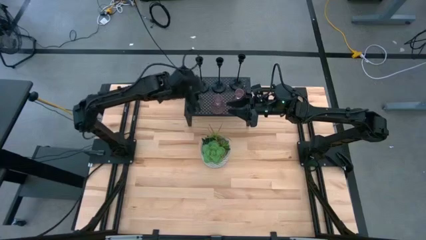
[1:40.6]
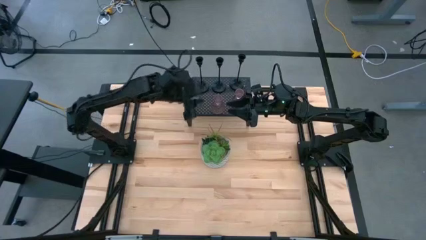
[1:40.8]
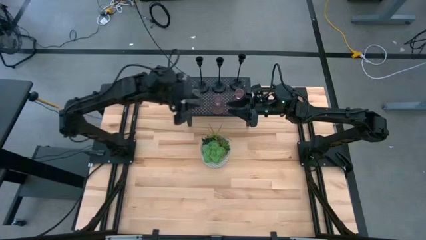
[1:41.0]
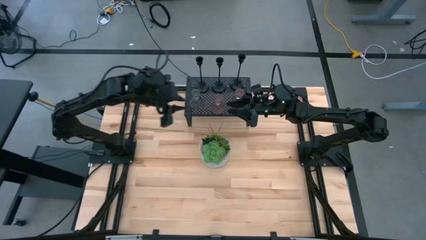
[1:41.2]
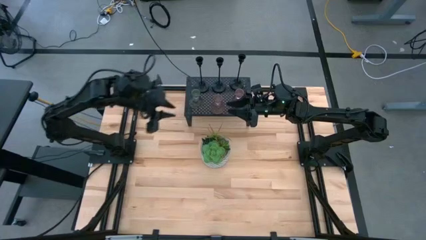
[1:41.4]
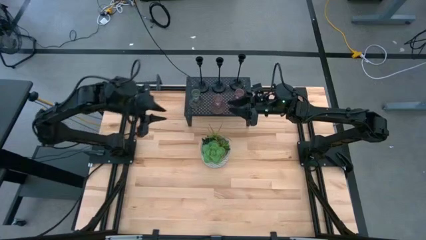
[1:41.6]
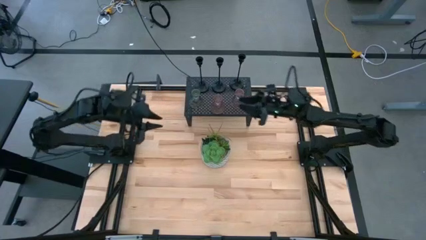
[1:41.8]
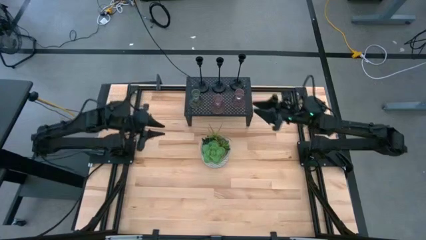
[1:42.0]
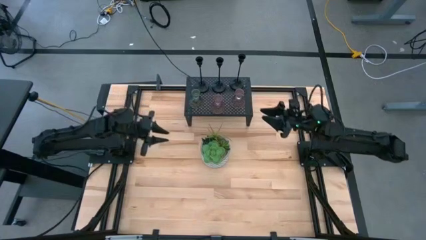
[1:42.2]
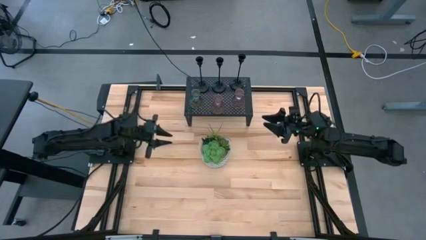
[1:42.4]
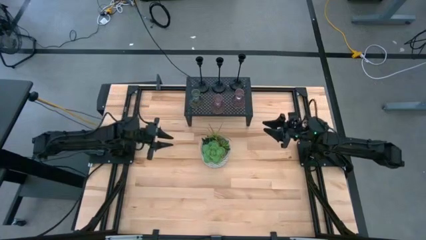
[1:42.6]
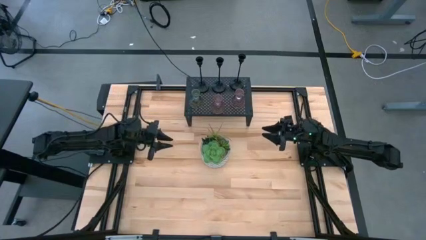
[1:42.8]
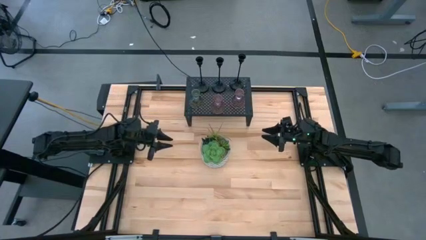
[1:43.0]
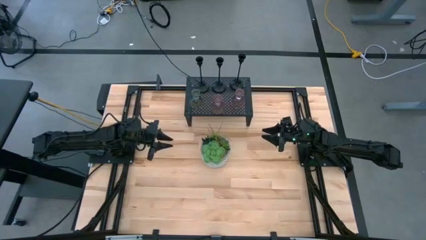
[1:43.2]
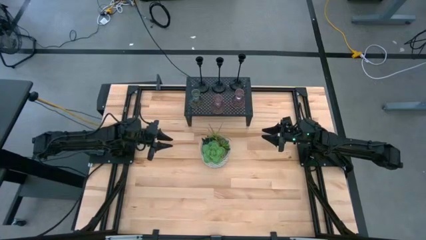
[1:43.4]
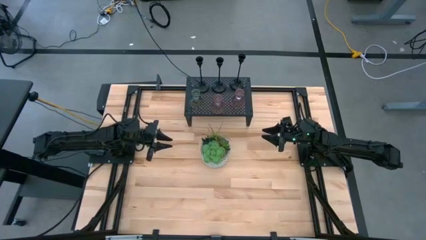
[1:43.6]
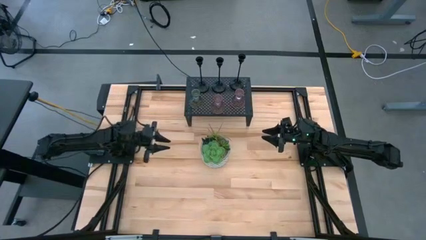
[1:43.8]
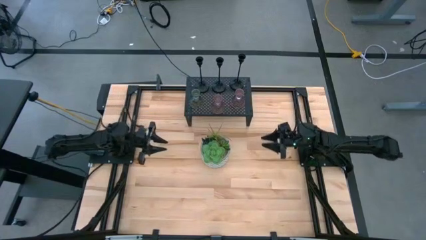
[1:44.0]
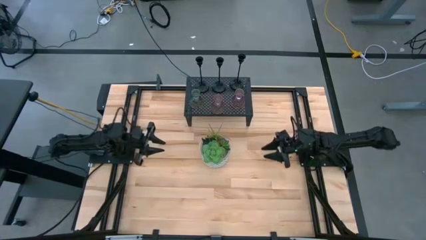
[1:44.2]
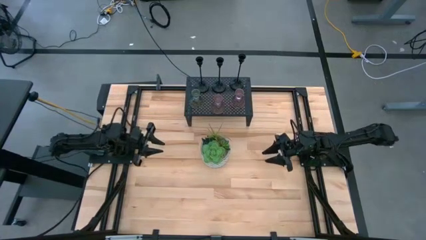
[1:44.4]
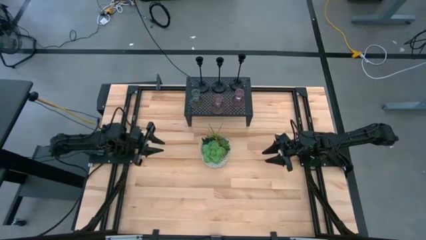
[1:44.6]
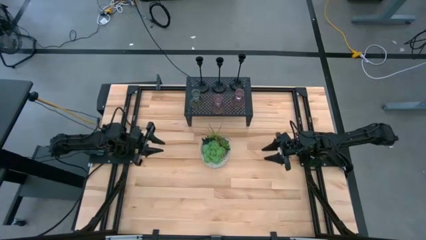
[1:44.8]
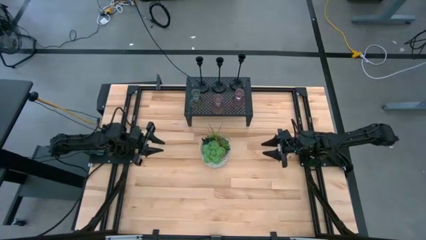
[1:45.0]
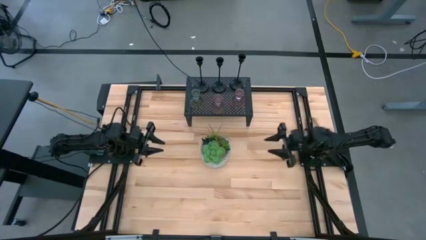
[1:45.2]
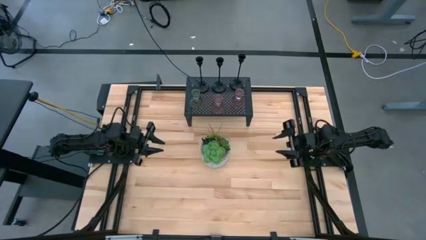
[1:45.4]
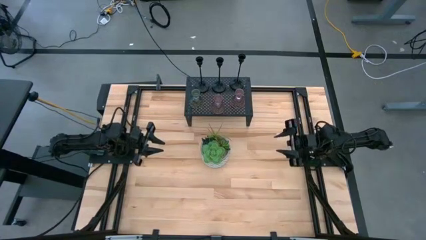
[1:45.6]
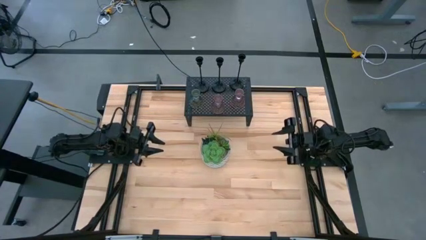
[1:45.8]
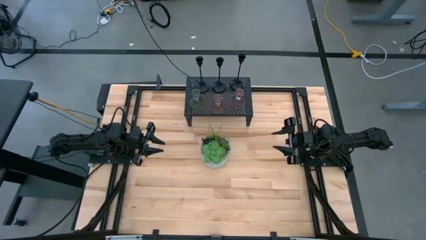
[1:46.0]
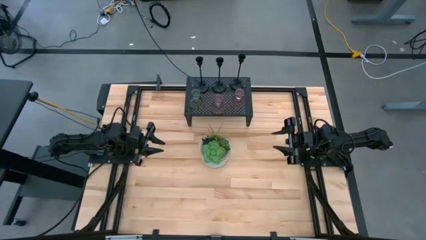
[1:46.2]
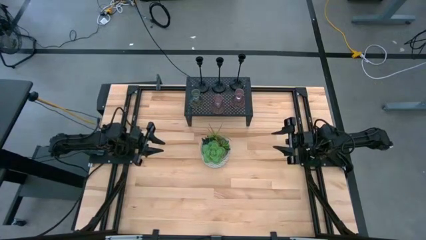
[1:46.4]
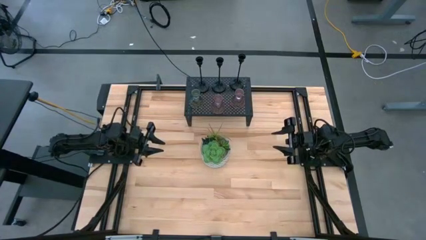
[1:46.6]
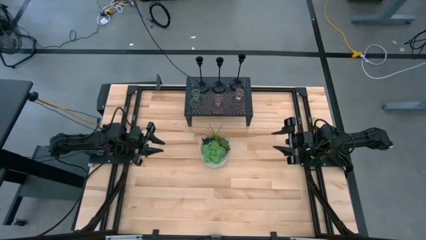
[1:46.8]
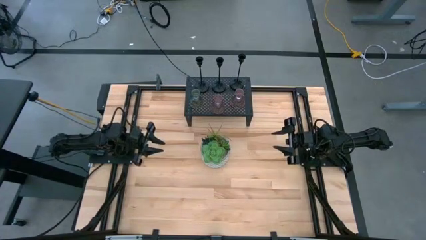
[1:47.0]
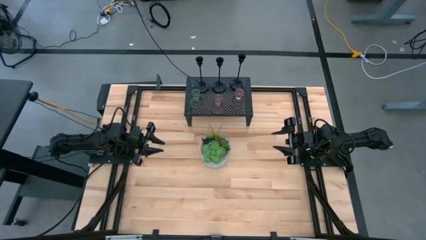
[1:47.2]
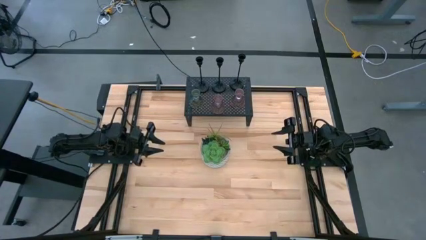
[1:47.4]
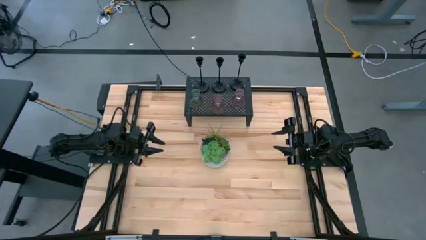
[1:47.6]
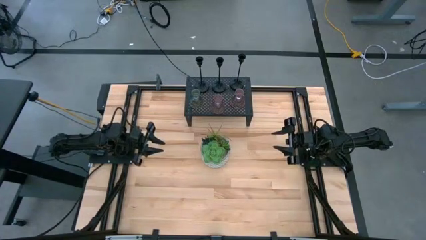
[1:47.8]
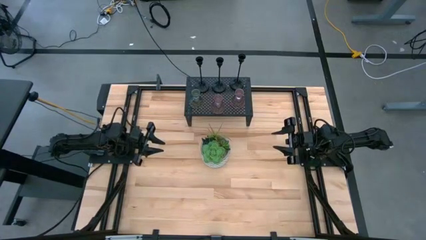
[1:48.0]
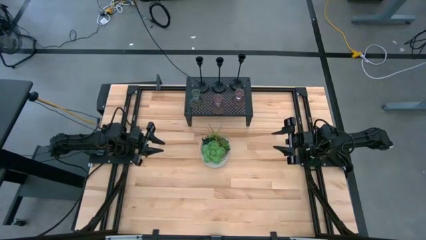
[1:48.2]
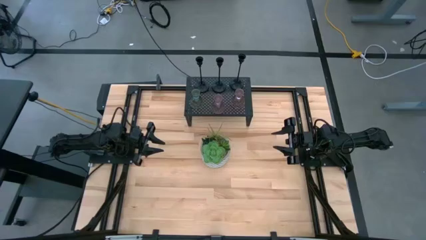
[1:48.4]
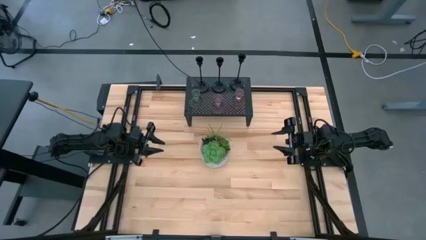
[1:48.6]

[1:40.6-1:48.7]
Task: Pick & Place candle stick holders
Return to Home Position
